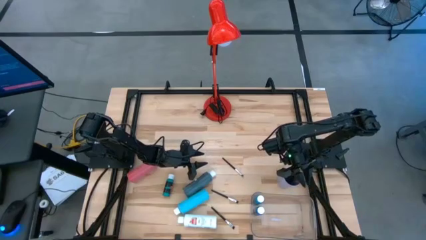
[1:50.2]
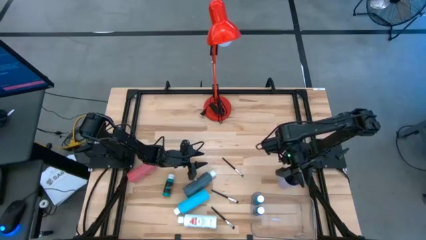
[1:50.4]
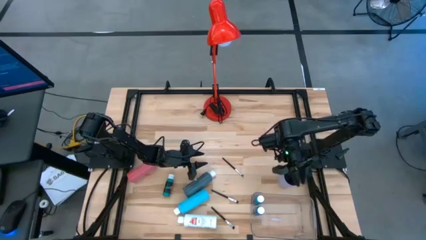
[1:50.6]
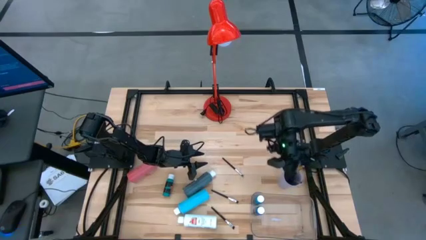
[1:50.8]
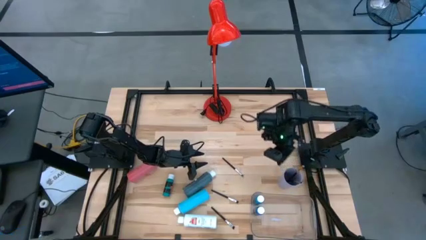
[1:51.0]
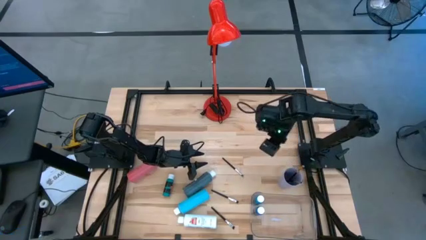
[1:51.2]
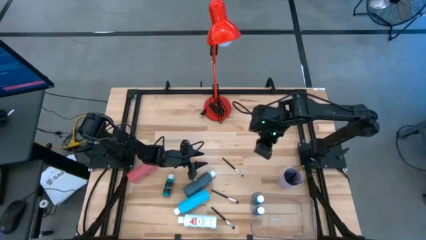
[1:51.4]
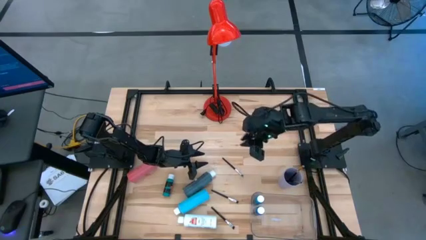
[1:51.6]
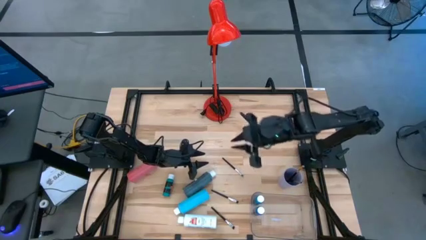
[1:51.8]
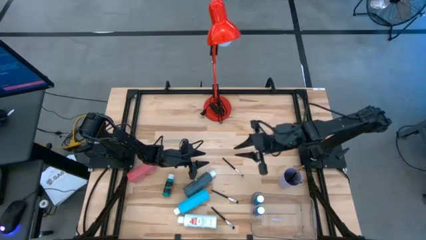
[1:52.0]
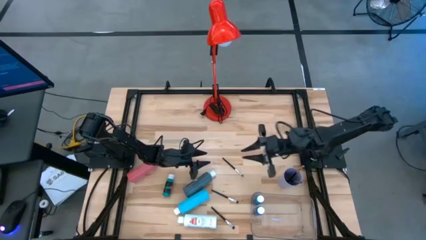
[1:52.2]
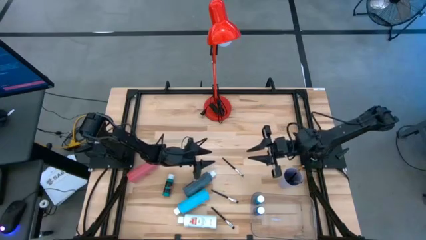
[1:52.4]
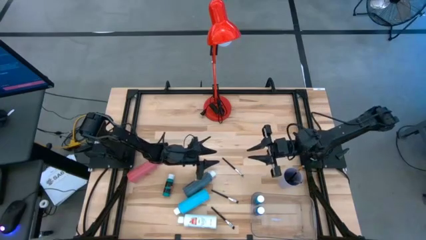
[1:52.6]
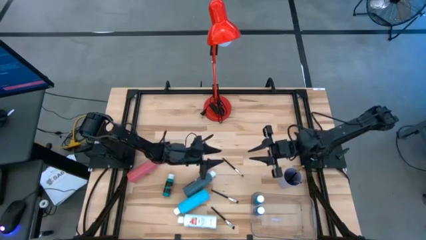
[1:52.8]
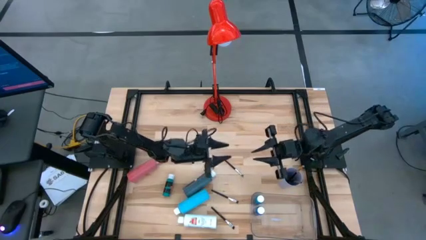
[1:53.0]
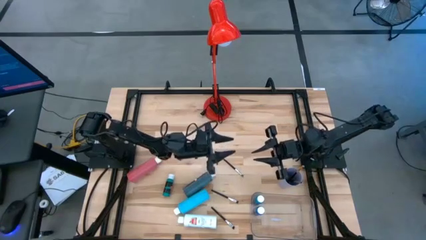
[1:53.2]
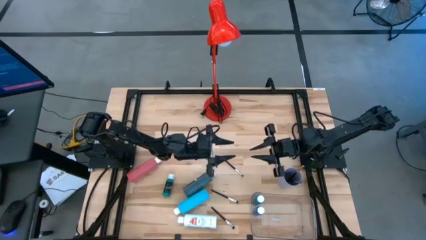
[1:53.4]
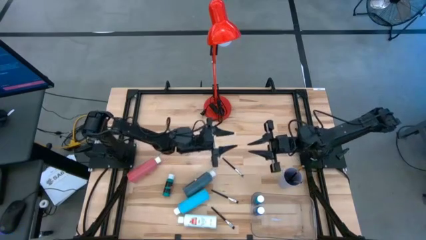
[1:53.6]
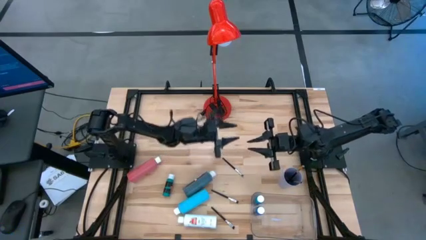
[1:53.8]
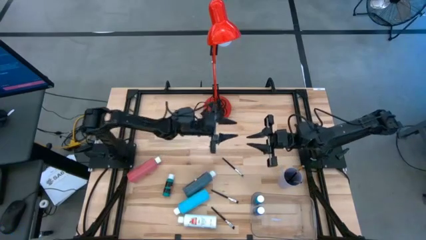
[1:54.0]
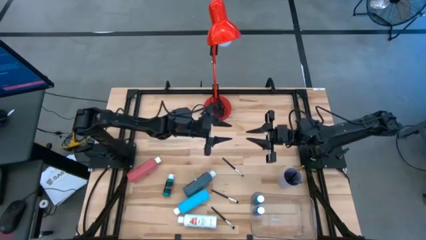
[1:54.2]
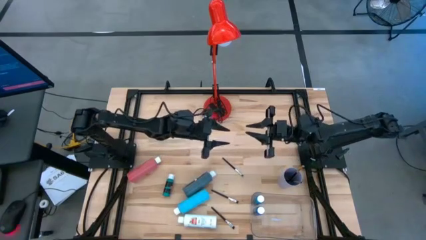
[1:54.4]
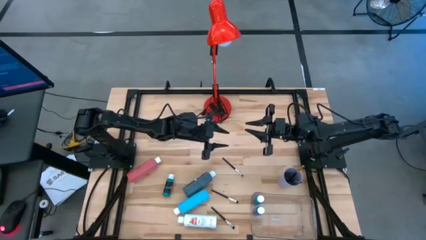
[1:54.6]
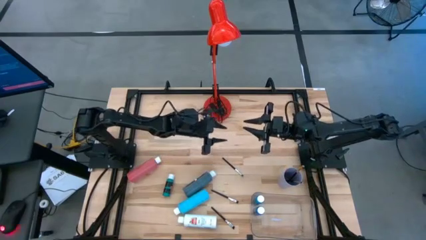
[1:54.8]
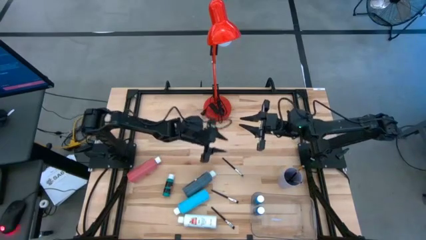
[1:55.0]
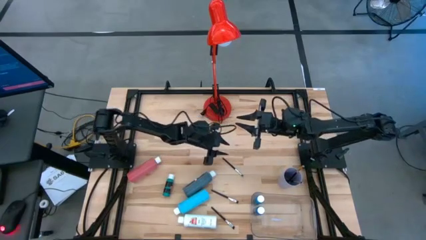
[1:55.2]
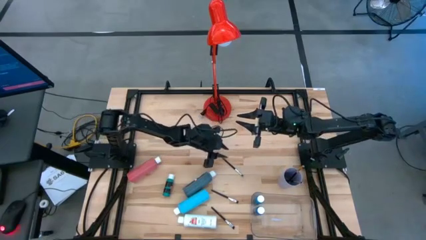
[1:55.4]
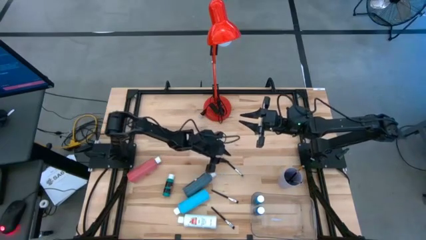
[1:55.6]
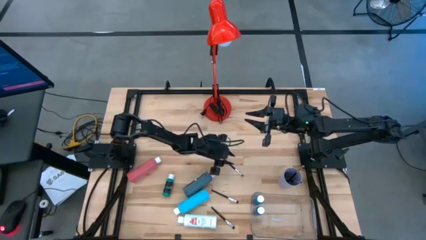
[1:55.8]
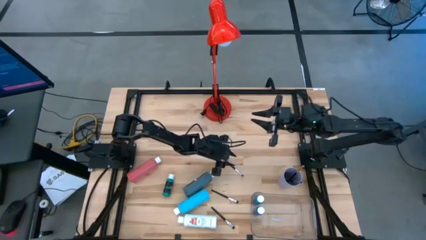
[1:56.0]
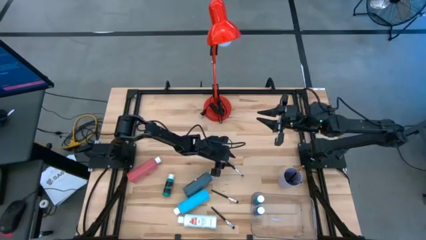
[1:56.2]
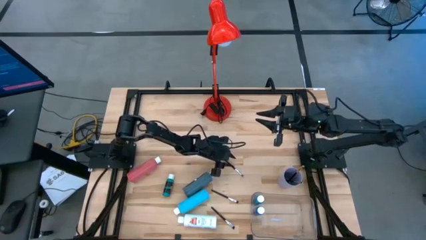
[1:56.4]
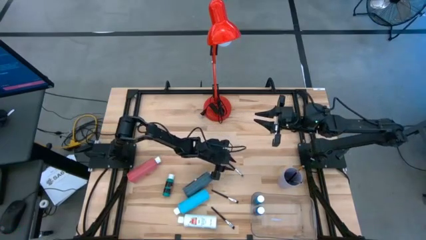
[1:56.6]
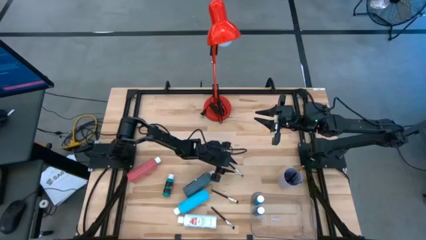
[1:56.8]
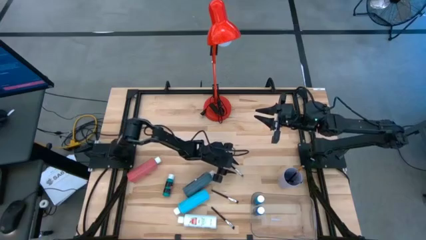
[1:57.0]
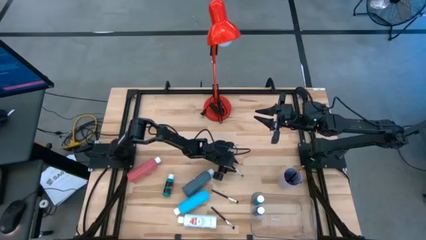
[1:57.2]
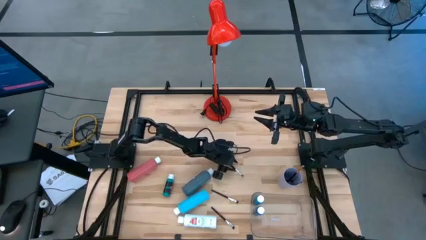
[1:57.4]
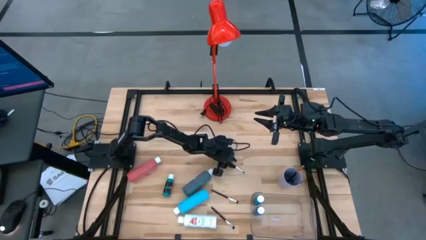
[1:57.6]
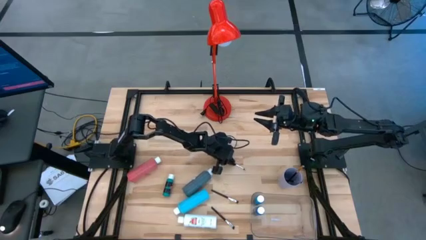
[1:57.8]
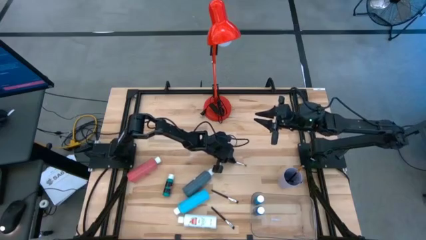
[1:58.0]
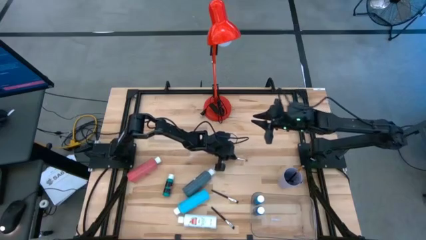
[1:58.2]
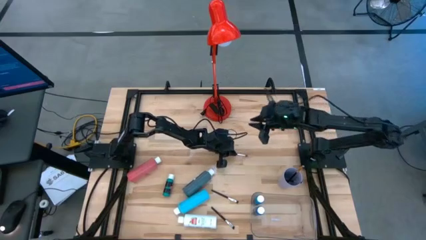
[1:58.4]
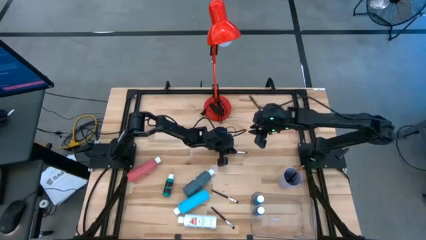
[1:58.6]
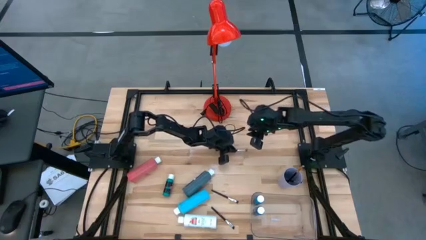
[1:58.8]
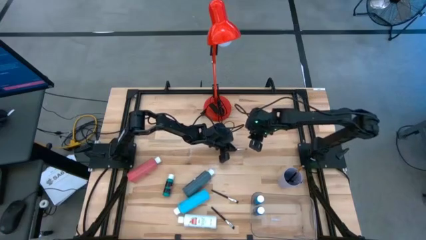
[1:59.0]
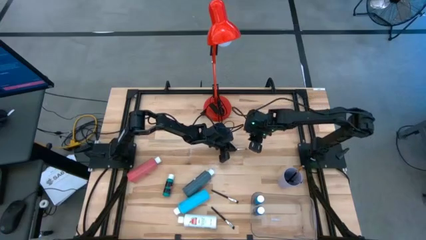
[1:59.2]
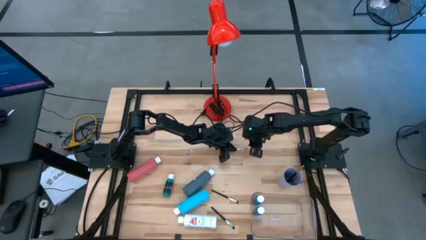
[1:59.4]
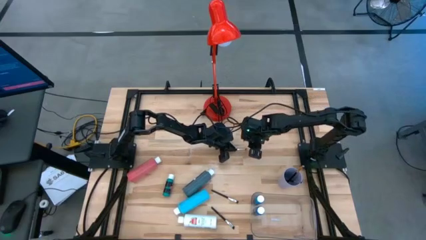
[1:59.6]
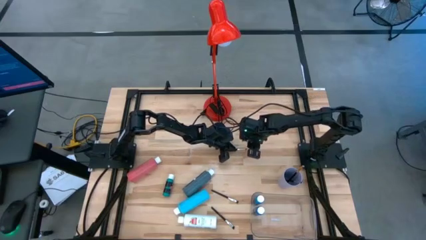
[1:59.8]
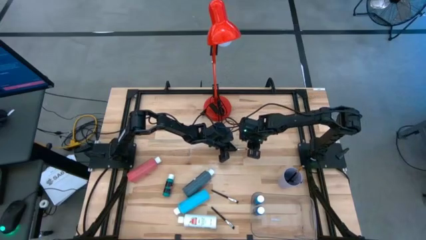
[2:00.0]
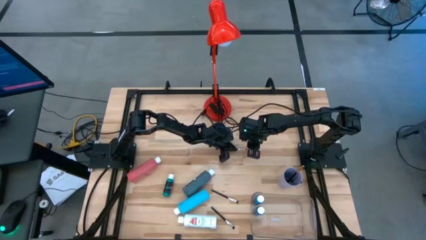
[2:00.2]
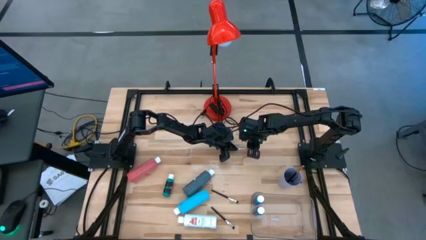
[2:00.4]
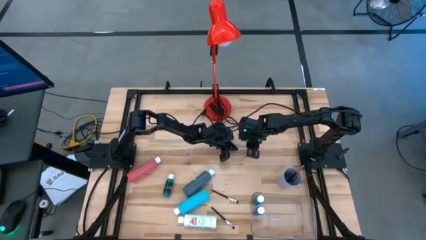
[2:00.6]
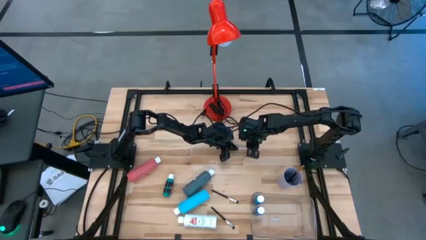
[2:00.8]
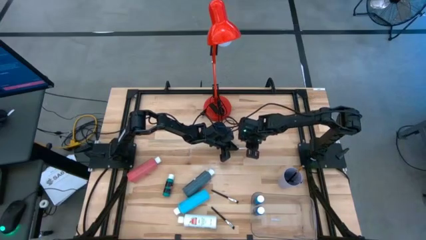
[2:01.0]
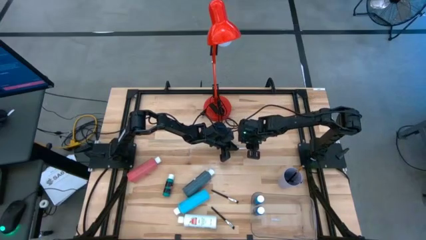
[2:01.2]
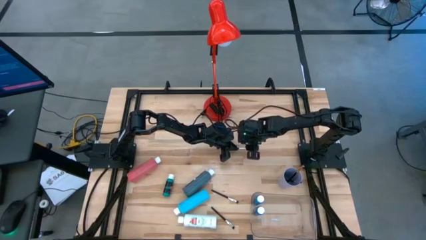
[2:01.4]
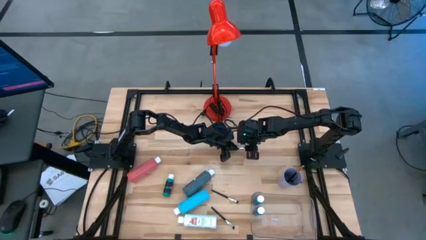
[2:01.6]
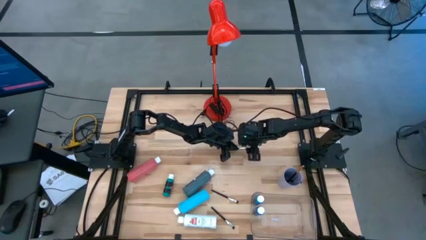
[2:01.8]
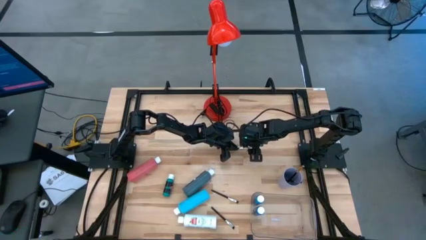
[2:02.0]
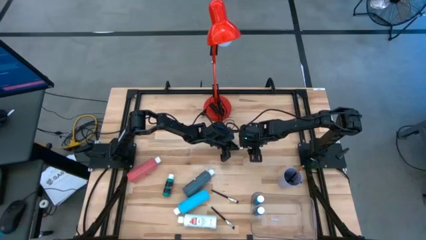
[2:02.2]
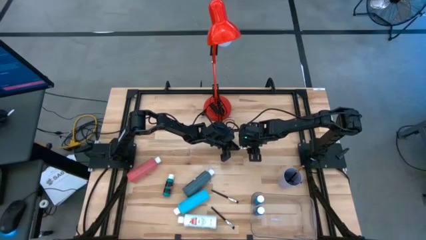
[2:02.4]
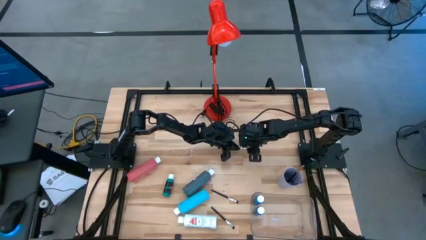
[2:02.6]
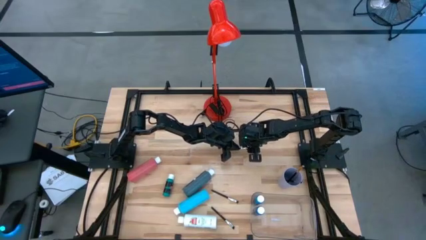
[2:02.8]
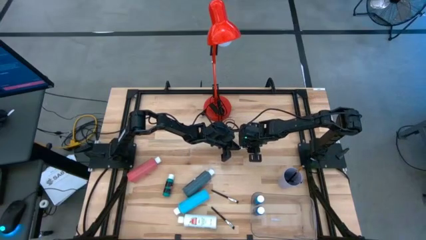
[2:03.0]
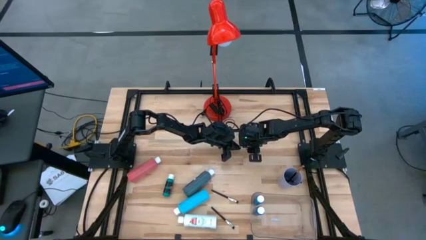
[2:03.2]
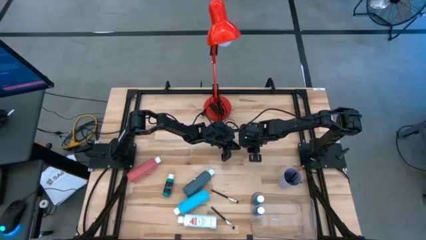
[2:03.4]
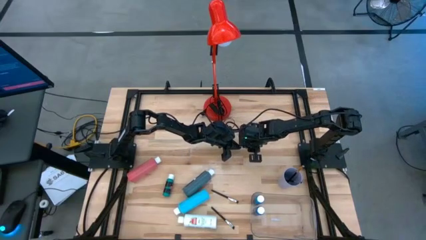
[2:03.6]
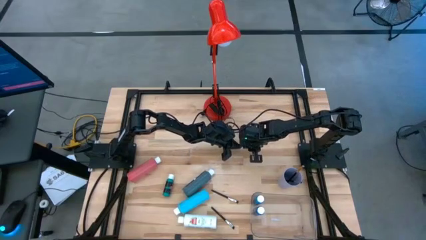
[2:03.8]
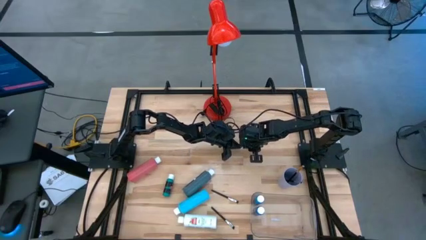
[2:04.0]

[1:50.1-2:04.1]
Task: Pick & Place Paint Supplies
Put the black silver paint brush into the purple cup

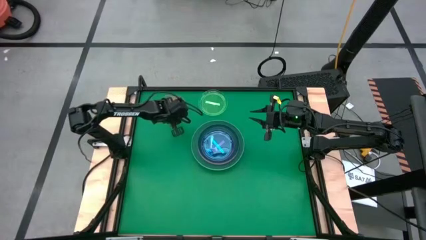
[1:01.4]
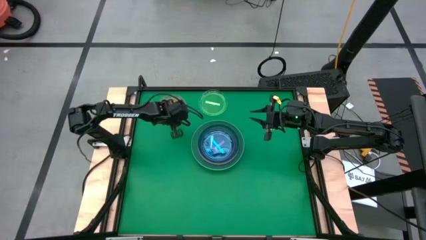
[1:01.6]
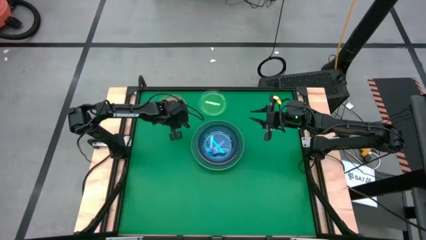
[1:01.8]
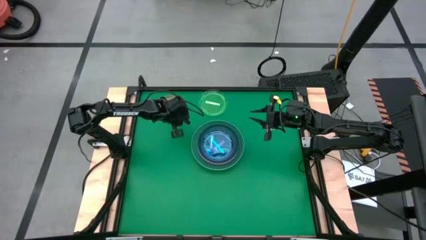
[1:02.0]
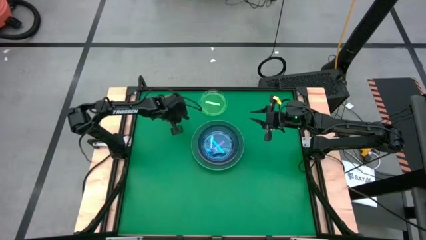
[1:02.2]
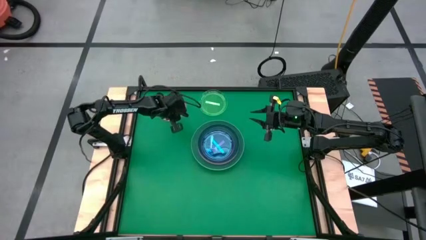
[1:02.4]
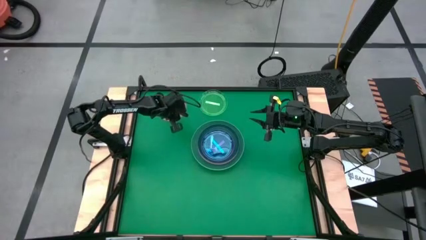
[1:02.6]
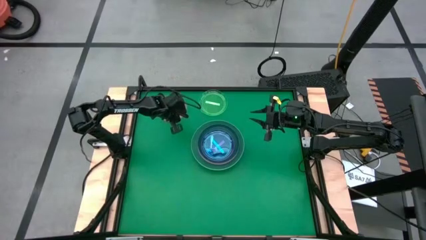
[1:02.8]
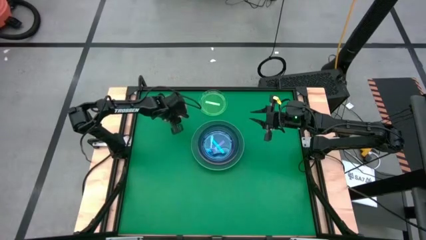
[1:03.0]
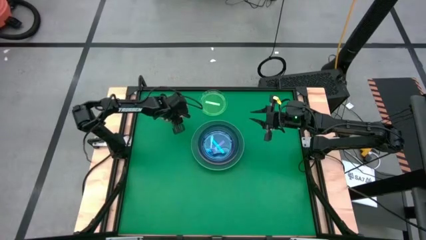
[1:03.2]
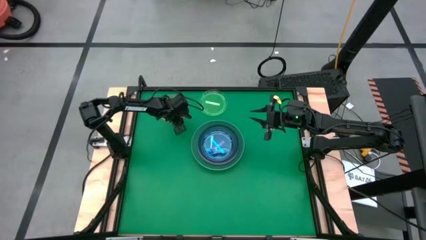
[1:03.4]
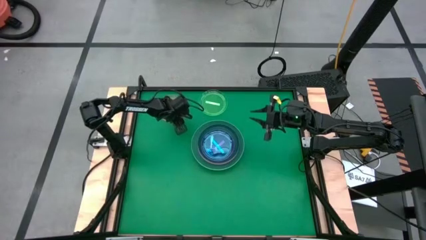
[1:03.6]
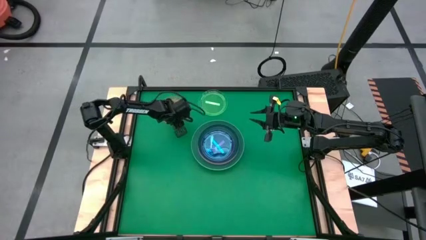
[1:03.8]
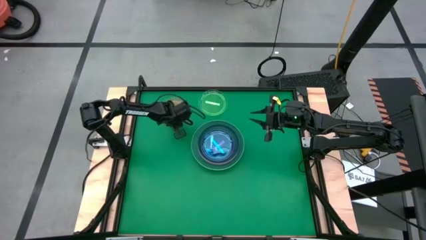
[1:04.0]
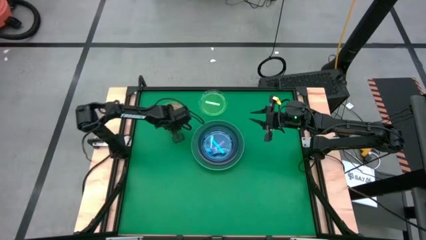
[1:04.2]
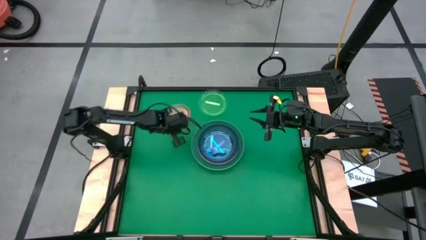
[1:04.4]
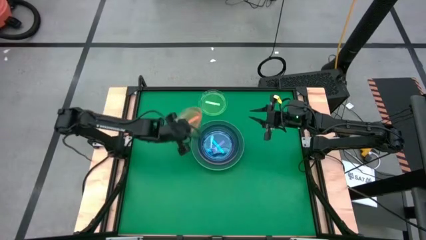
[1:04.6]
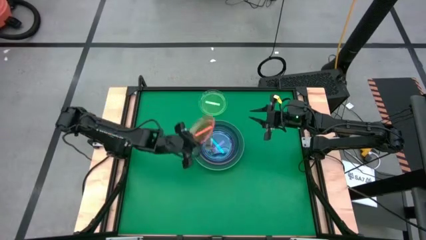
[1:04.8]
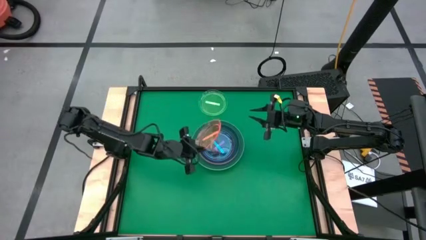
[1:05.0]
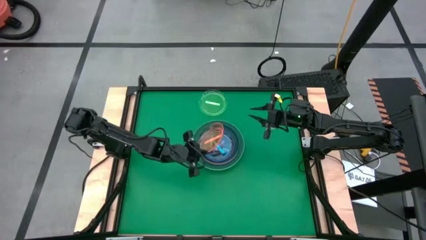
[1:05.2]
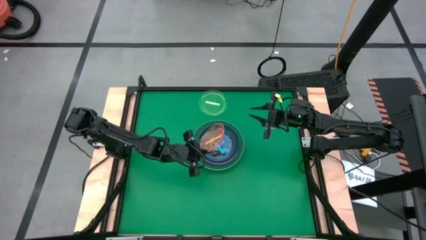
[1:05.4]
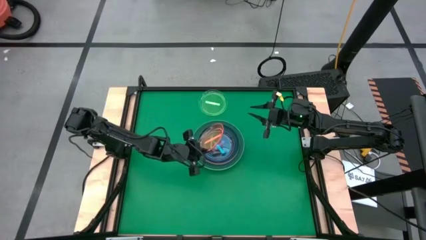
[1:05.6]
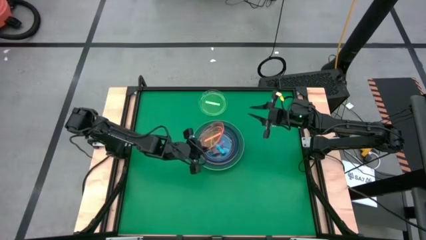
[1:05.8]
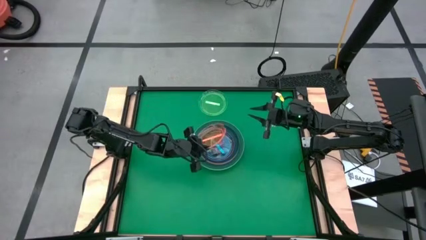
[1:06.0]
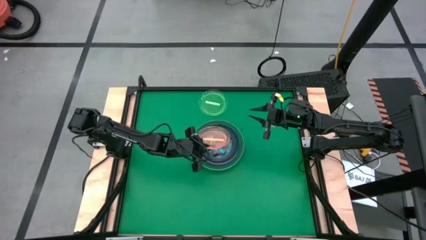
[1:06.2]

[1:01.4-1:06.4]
Task: Stack plastic plates
Stack the orange plate on top of the blue plate
